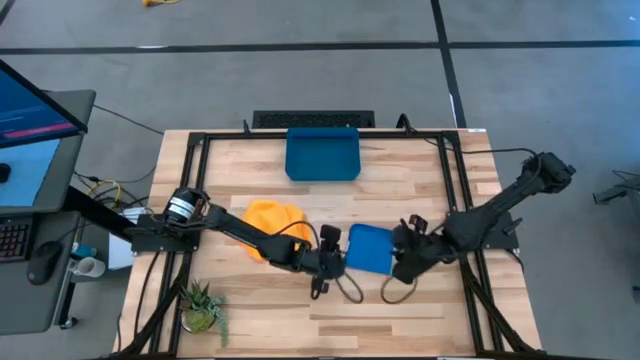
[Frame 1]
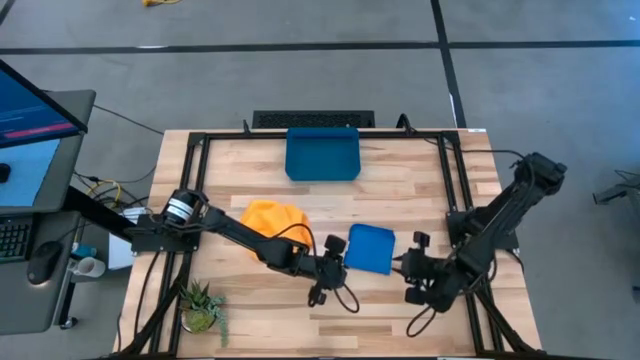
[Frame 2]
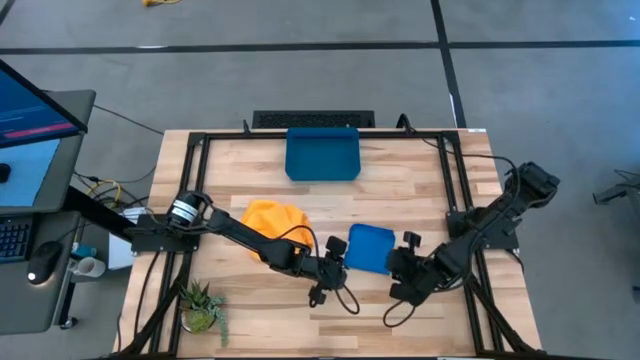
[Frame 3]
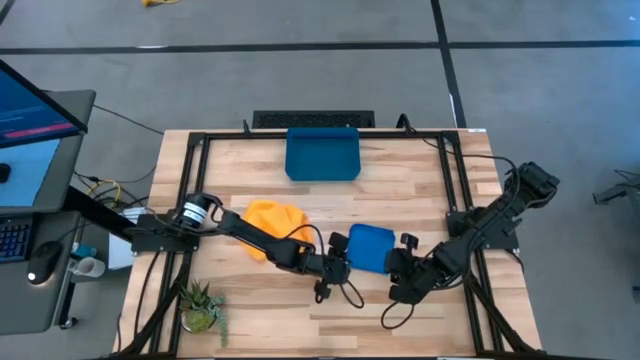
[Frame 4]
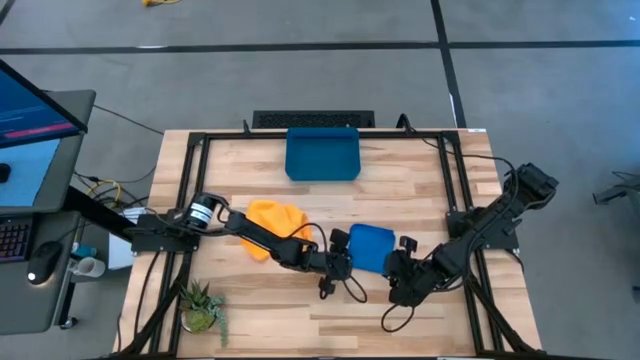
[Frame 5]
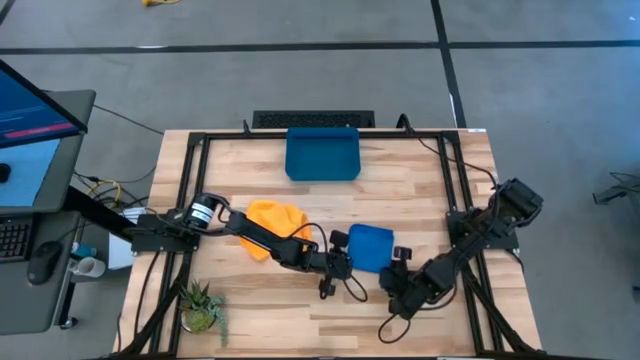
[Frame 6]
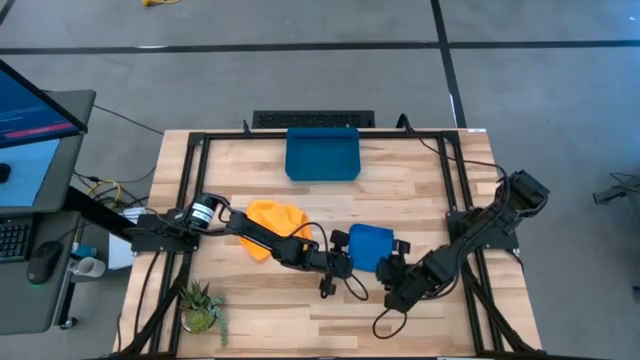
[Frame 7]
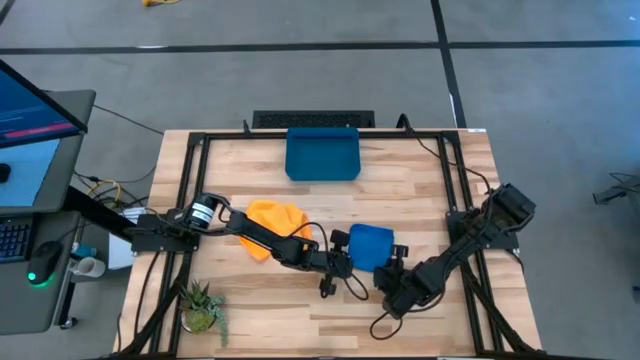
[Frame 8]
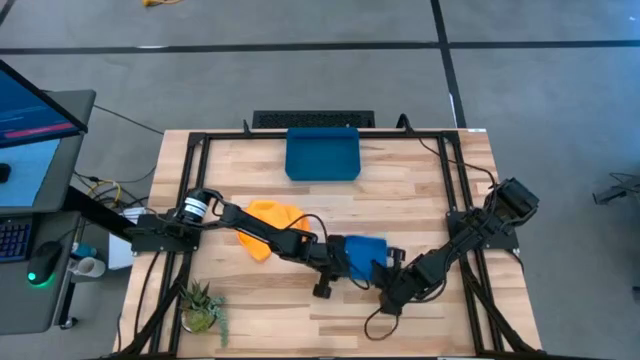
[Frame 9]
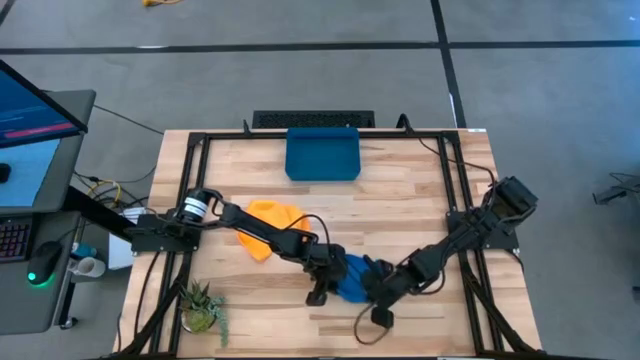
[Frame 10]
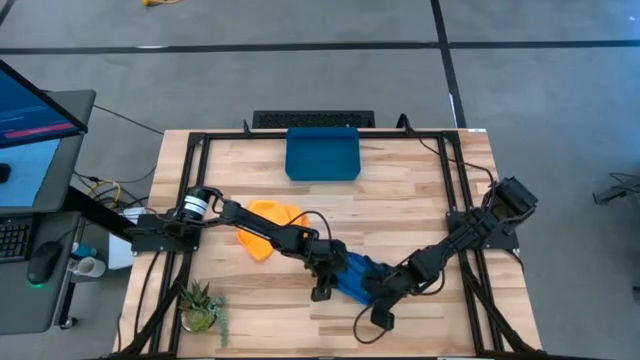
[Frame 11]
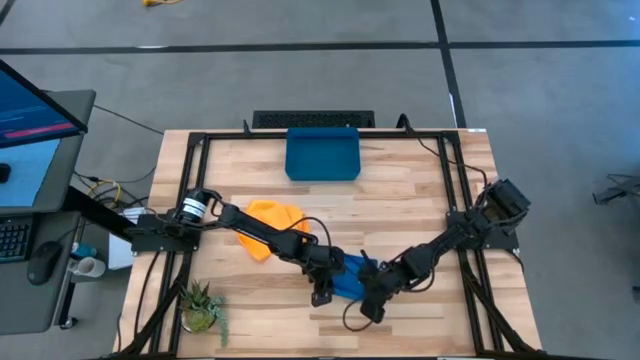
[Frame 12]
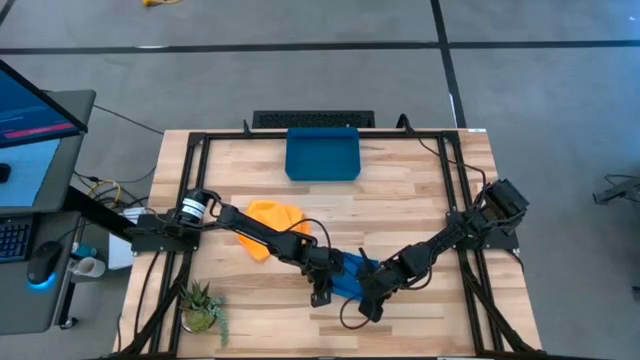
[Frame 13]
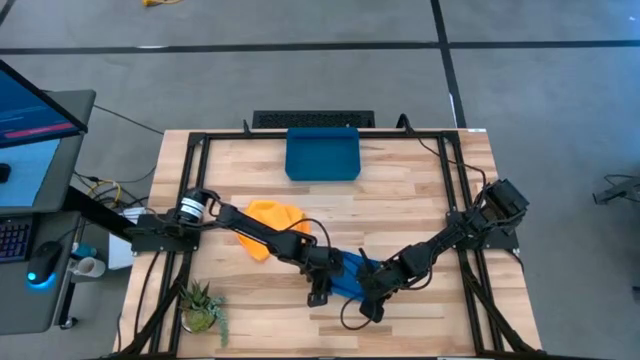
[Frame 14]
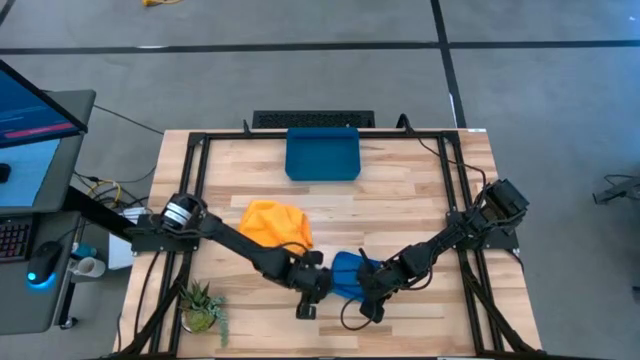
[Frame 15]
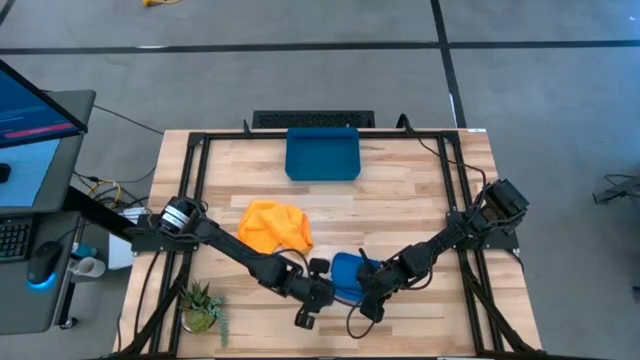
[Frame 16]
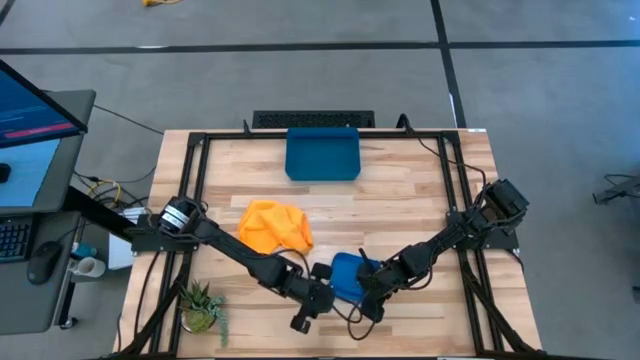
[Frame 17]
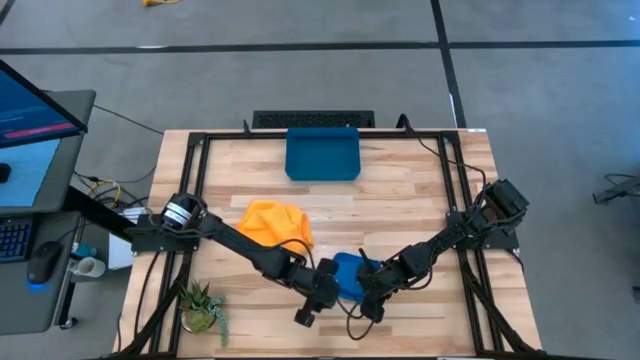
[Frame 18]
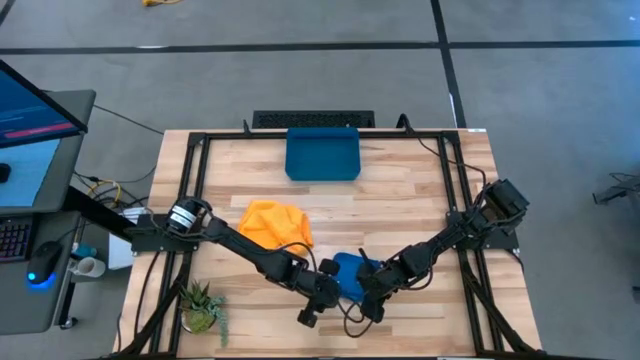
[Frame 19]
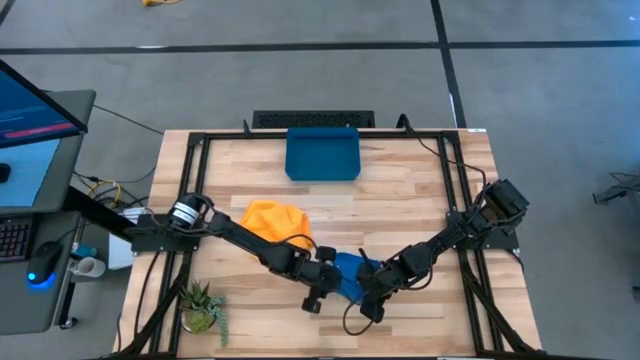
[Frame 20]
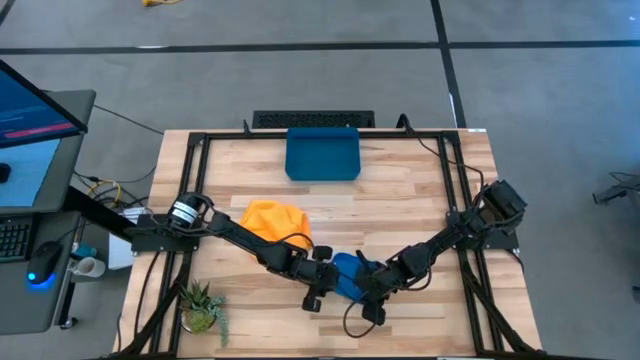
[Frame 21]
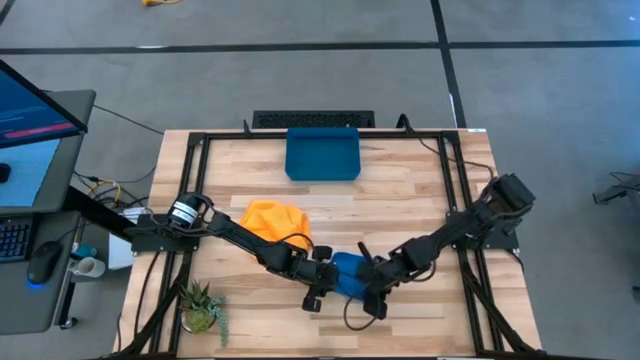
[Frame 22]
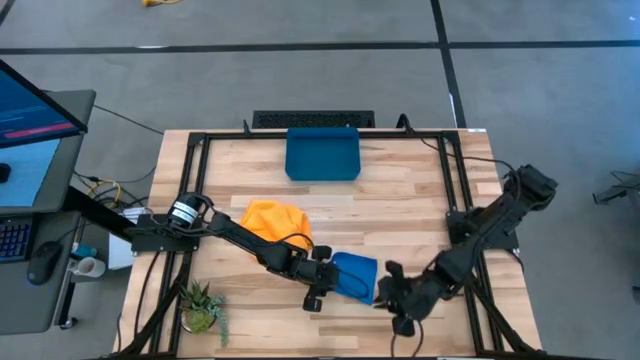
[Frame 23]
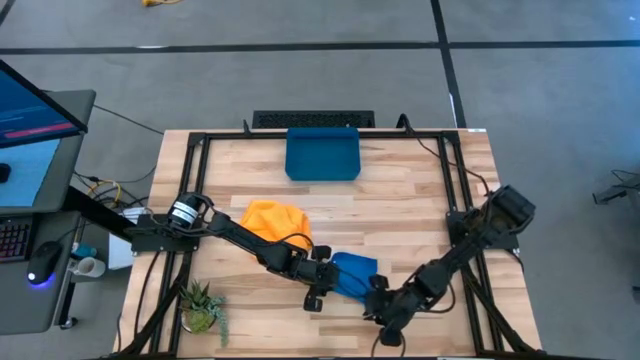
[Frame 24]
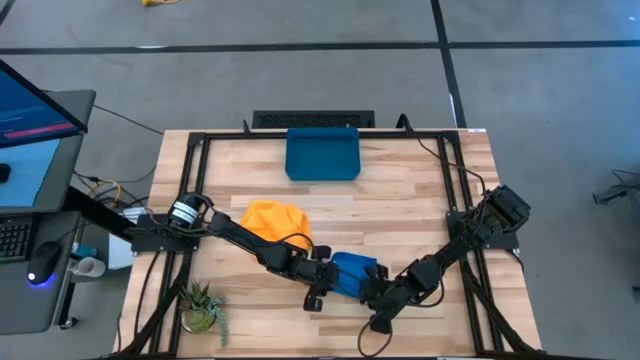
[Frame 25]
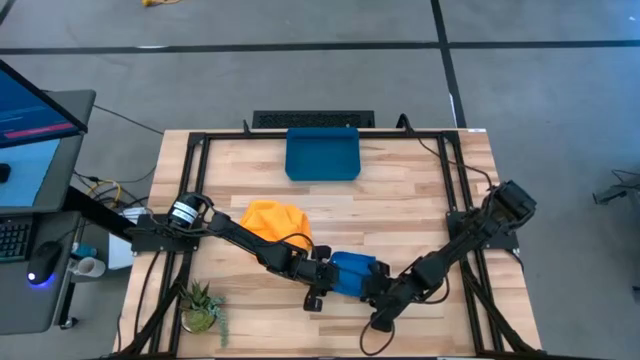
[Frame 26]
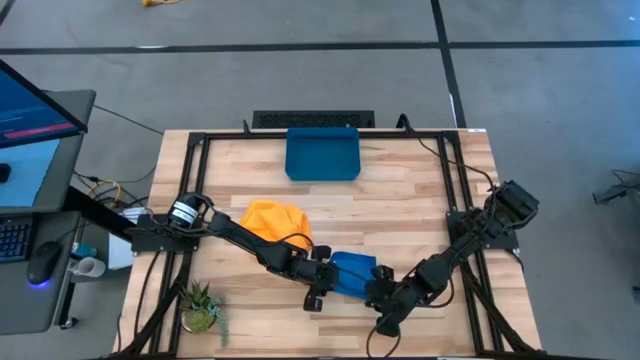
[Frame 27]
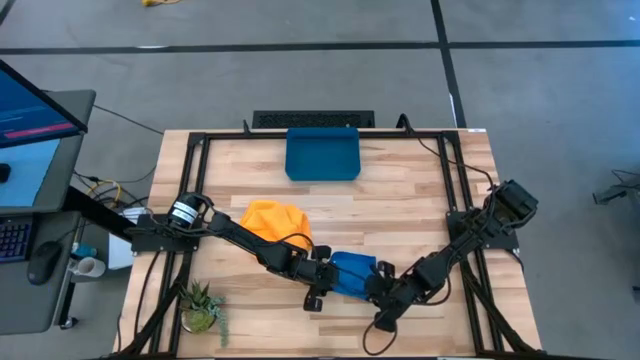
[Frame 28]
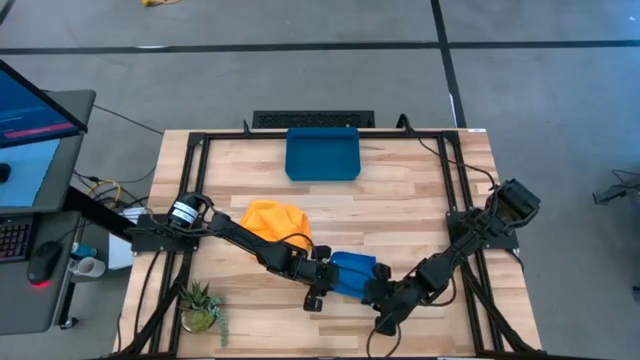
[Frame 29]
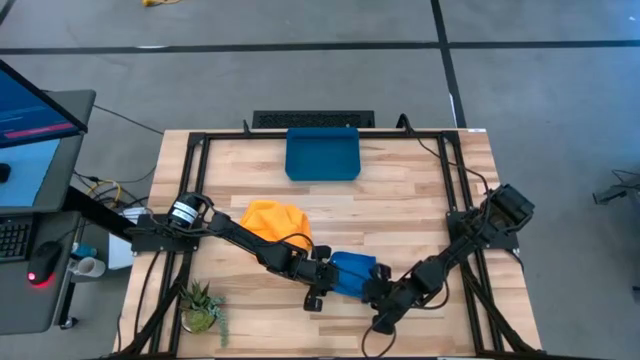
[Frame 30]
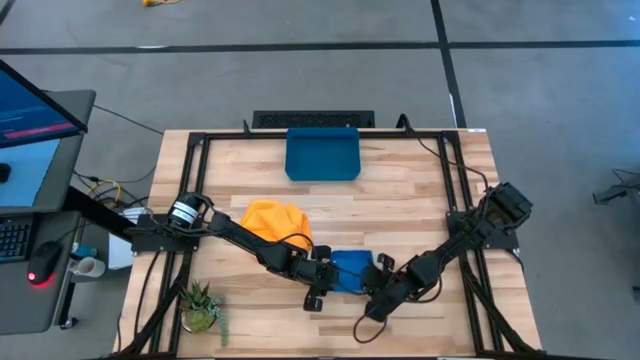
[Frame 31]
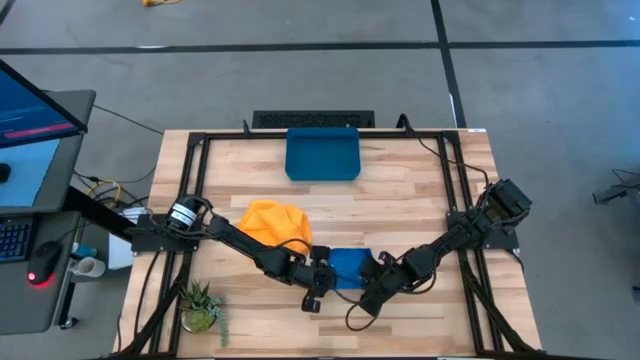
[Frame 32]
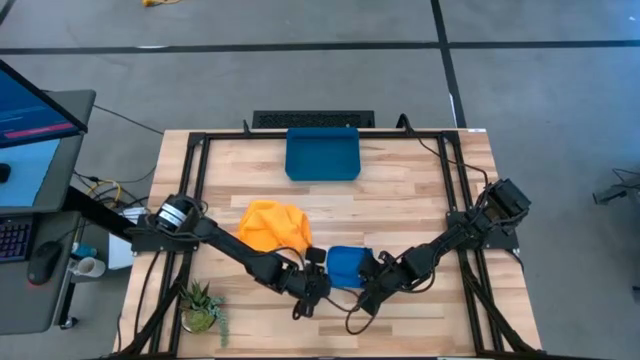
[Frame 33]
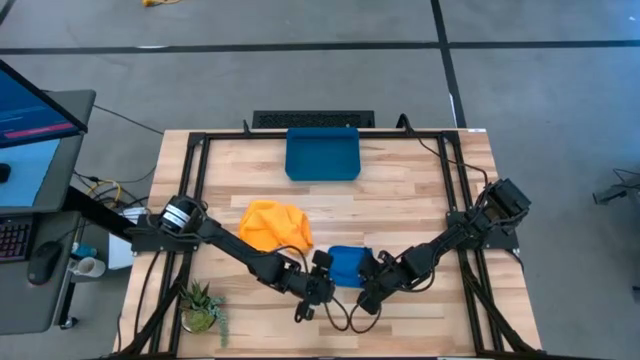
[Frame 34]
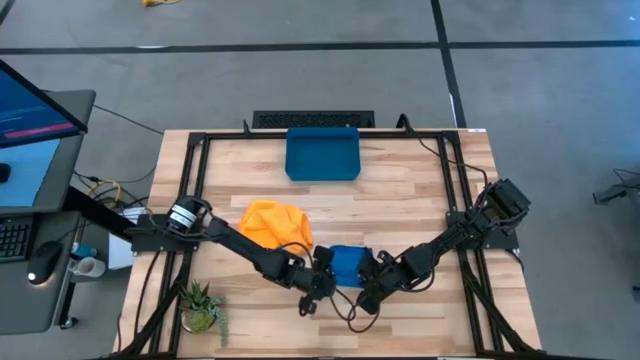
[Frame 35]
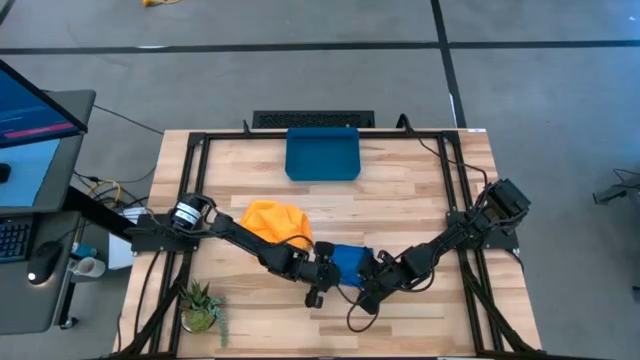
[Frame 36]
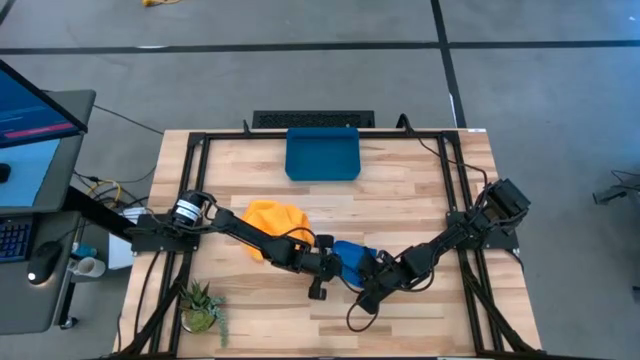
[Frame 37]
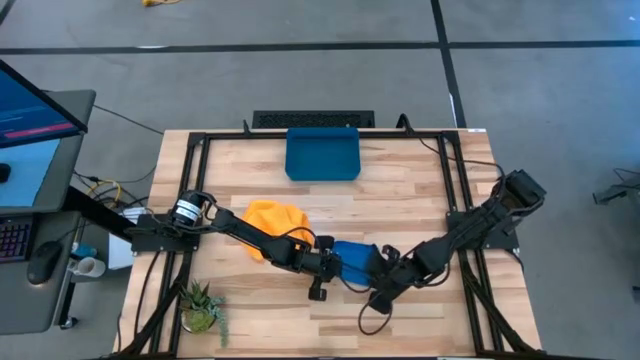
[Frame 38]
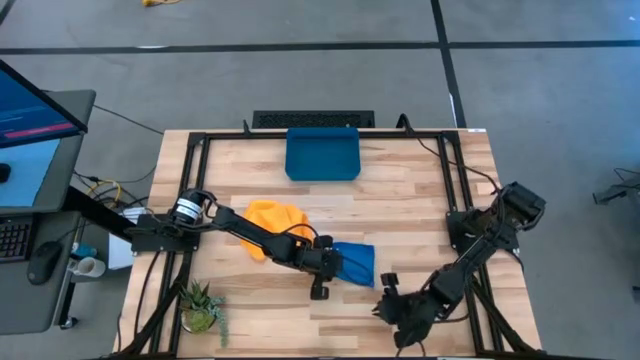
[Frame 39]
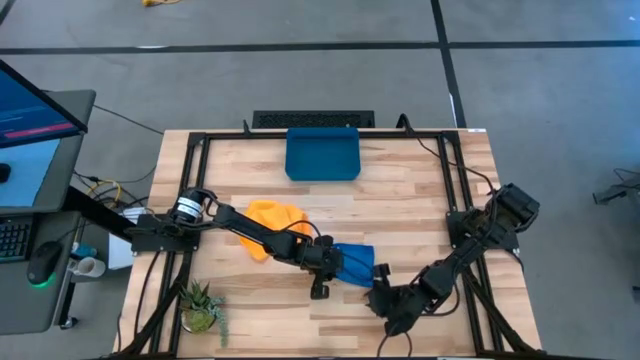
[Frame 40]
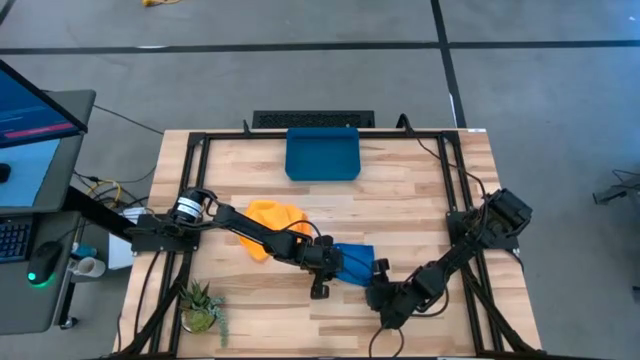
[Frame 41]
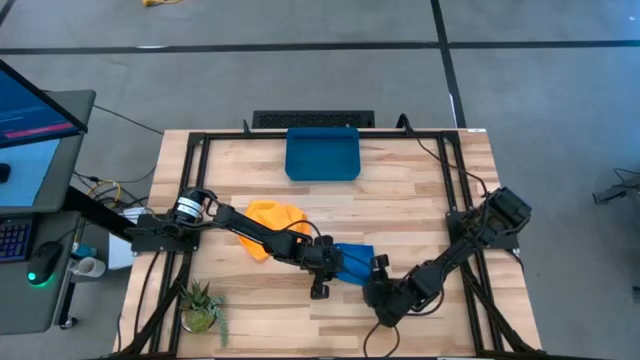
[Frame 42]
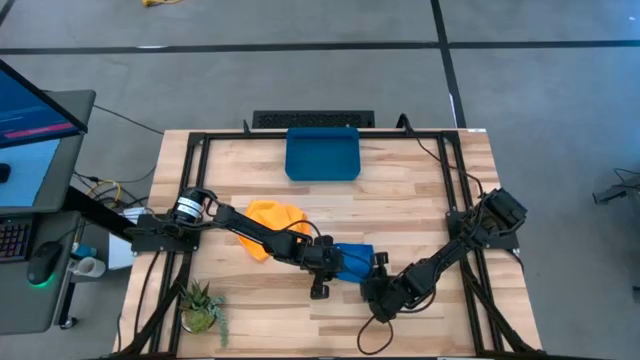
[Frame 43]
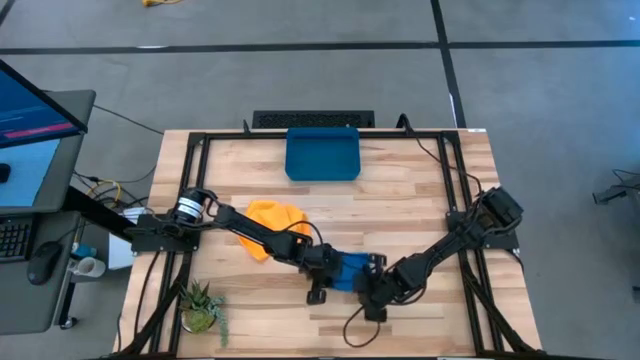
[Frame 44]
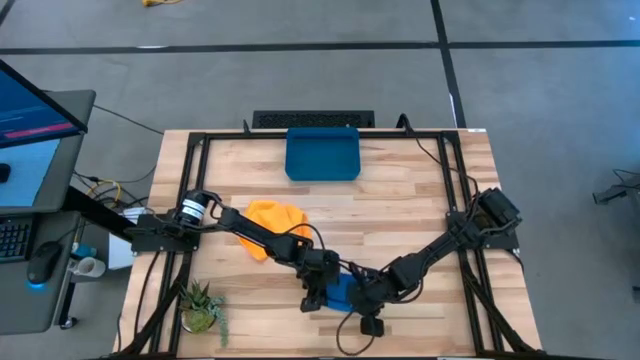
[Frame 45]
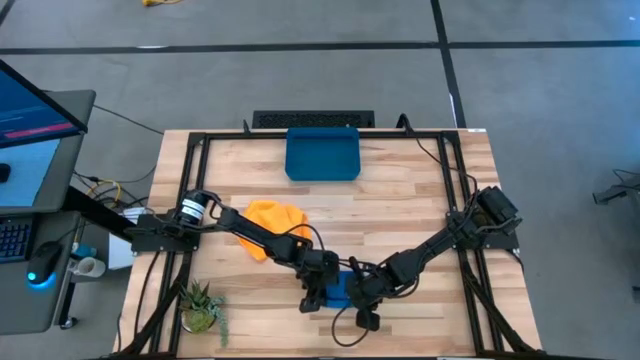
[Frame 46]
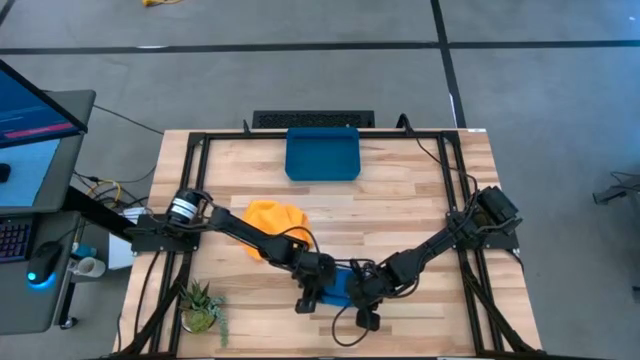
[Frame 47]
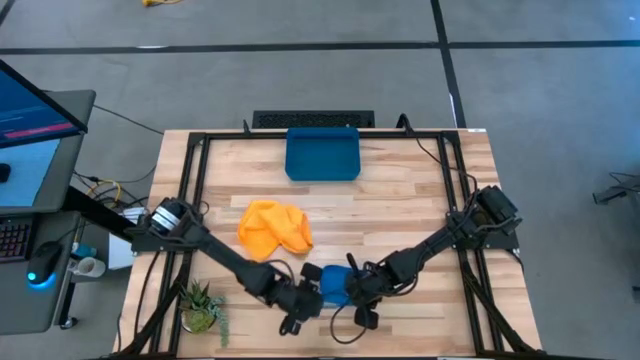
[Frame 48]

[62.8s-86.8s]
Task: Roll microfiber towels into tight, uniform cylinder then place into a basket
Roll the blue microfiber towel
